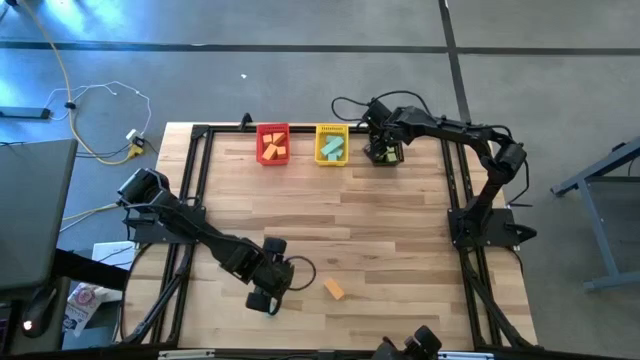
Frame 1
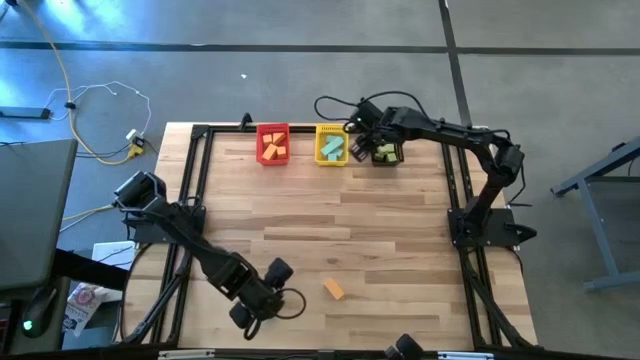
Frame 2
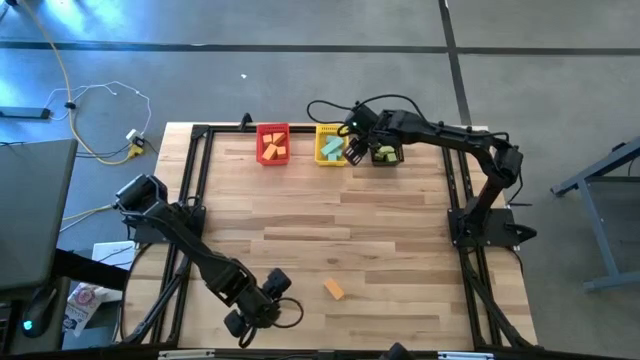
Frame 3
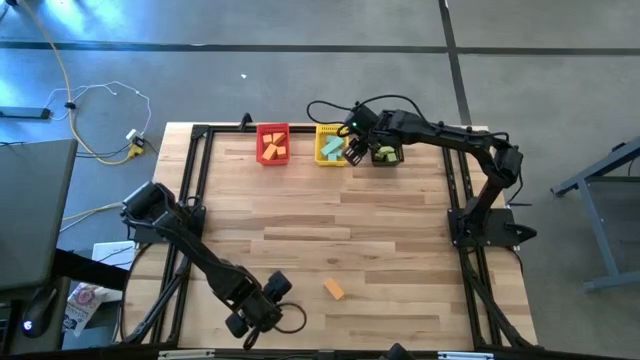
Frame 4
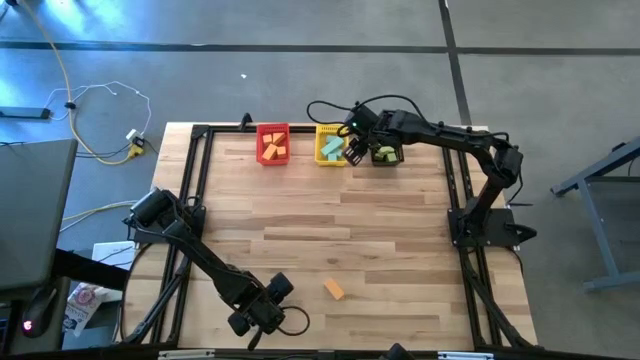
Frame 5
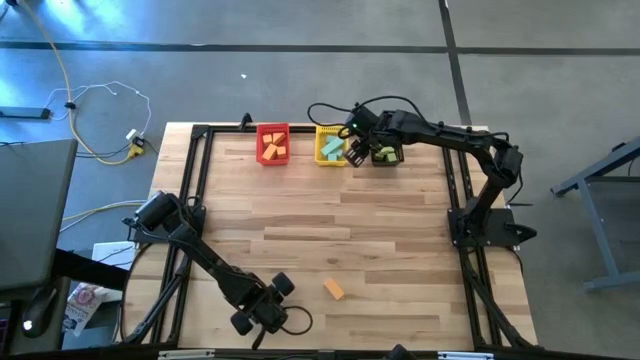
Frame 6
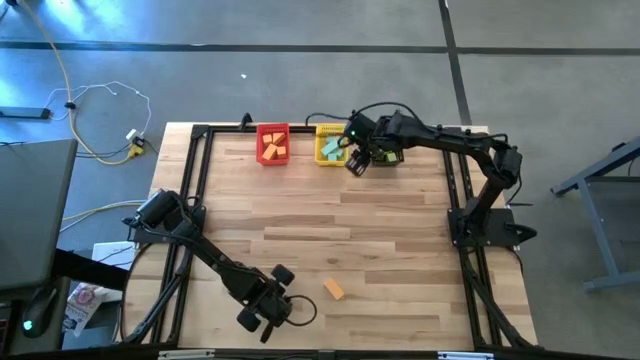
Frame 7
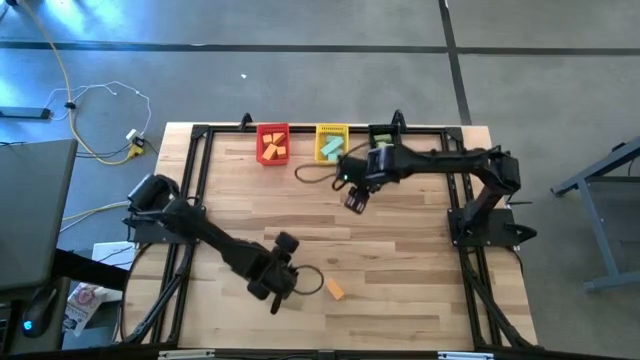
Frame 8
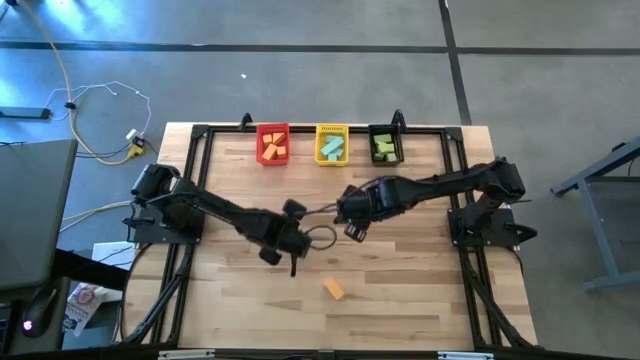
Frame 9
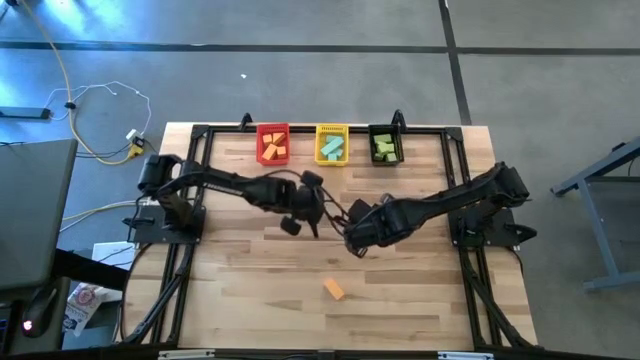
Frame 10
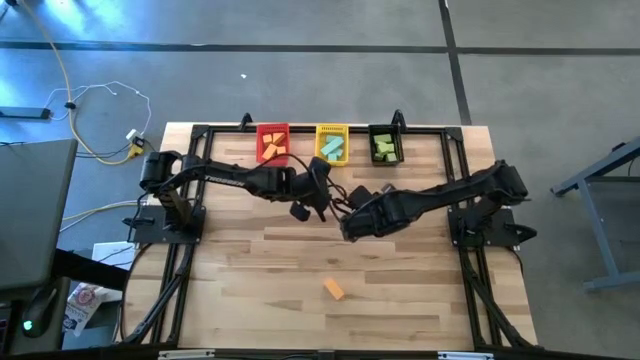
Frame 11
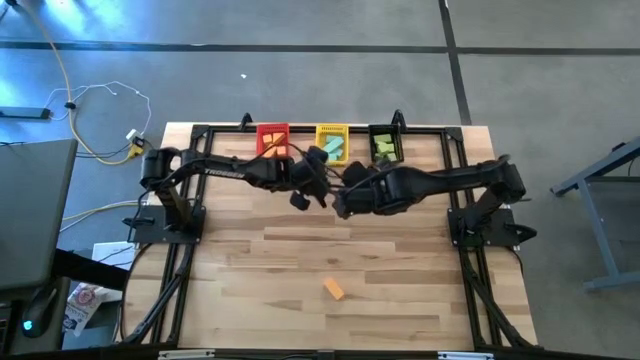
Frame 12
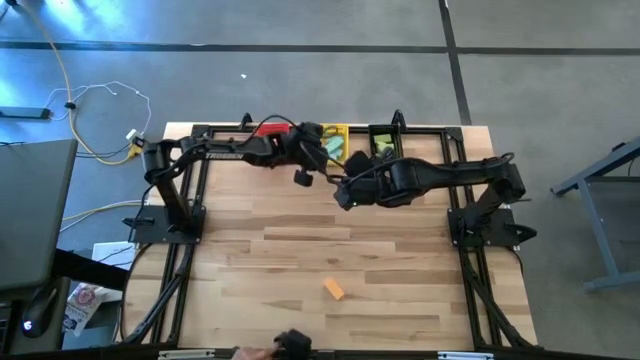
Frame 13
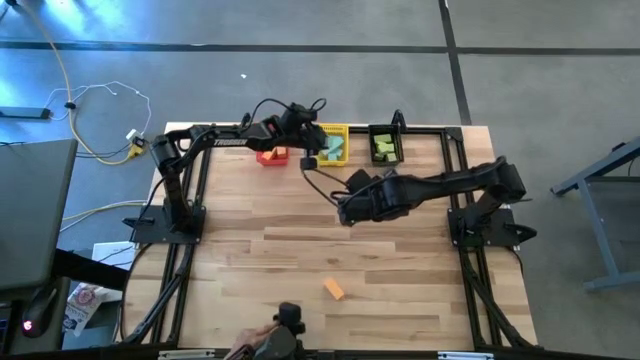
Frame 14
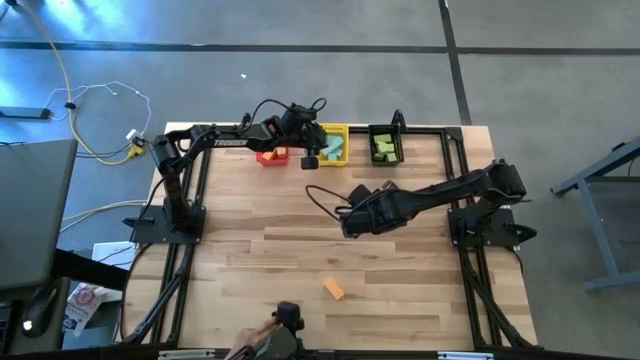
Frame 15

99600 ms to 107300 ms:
Task: Sort & place blocks by color
Put the blue block into the yellow bin

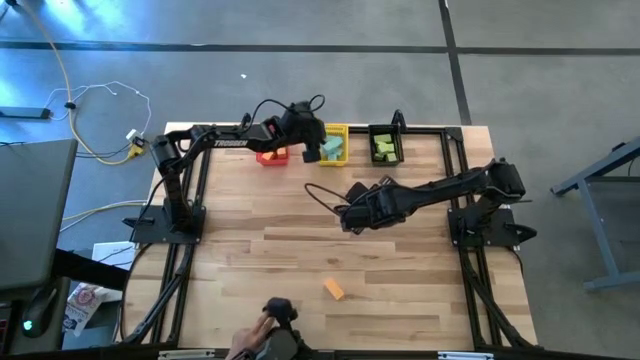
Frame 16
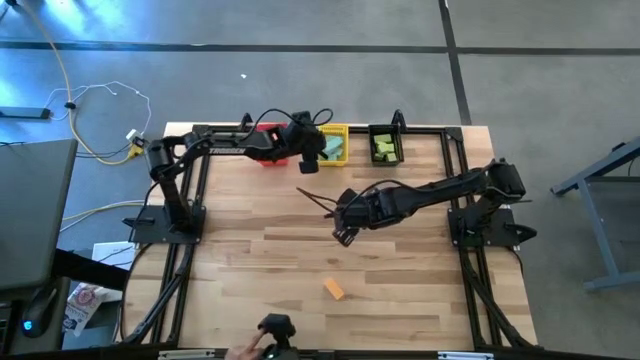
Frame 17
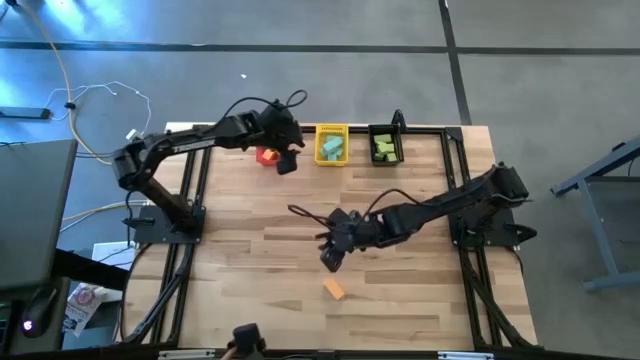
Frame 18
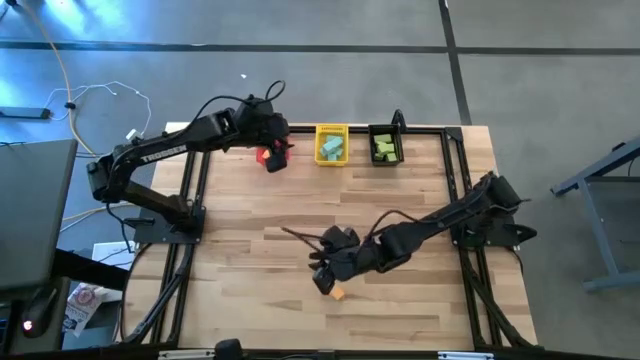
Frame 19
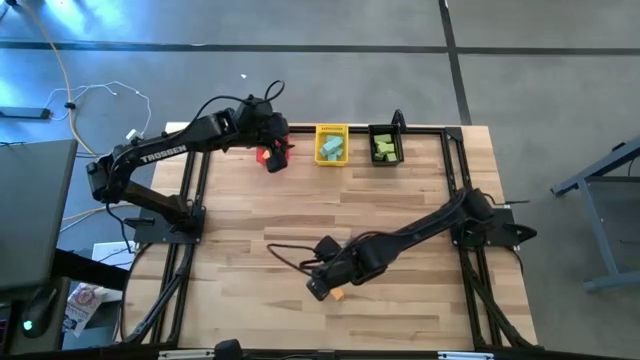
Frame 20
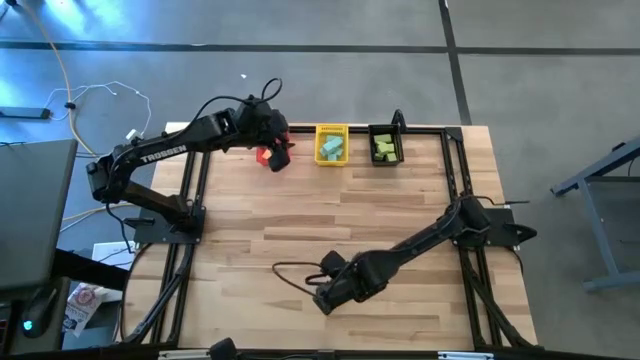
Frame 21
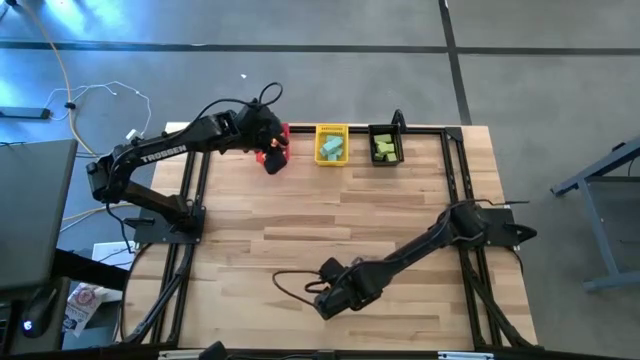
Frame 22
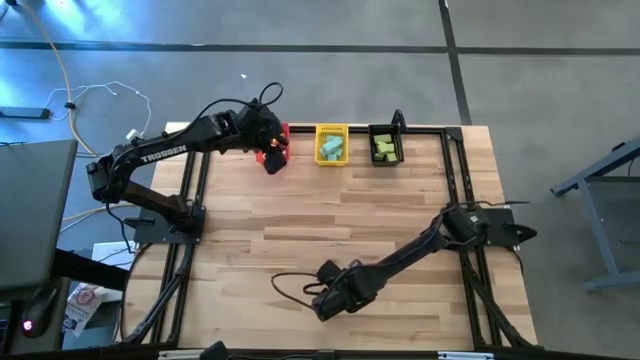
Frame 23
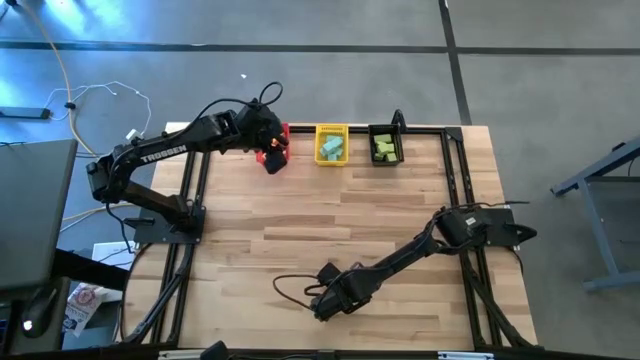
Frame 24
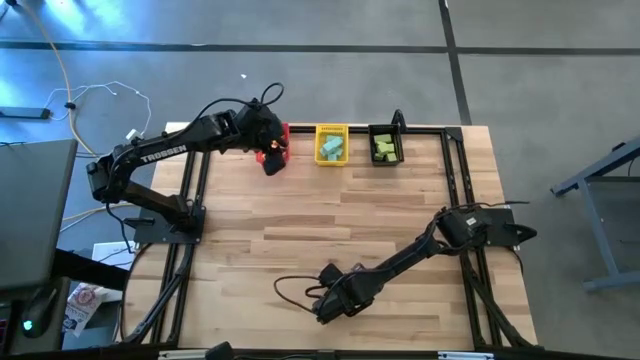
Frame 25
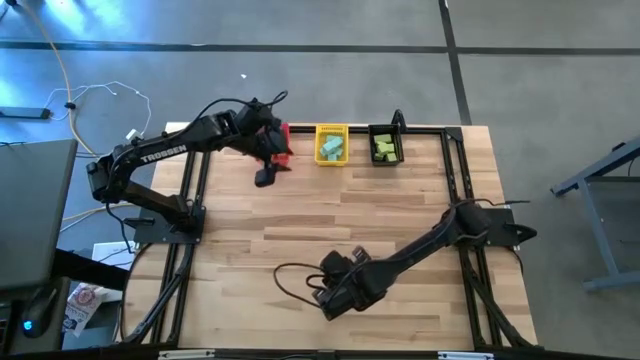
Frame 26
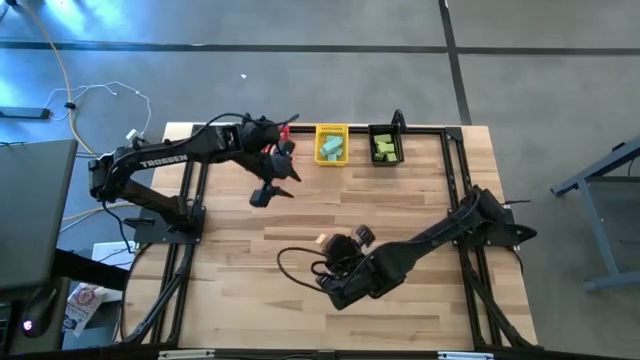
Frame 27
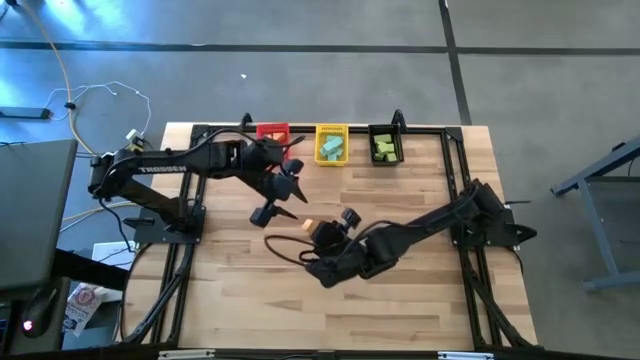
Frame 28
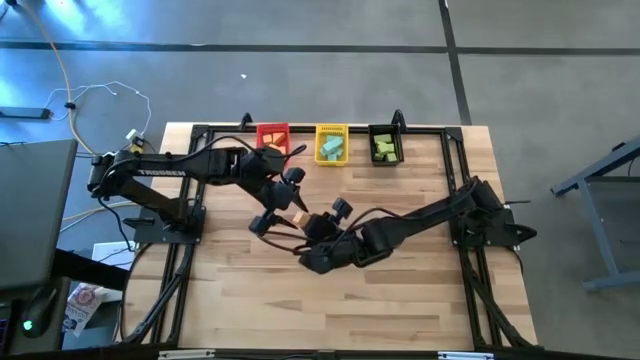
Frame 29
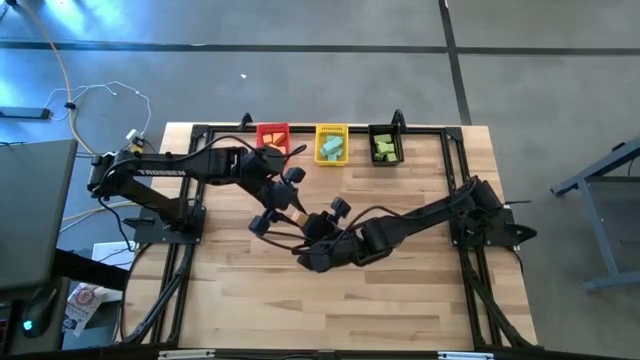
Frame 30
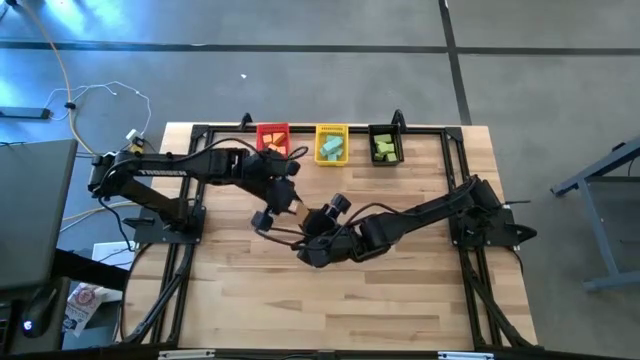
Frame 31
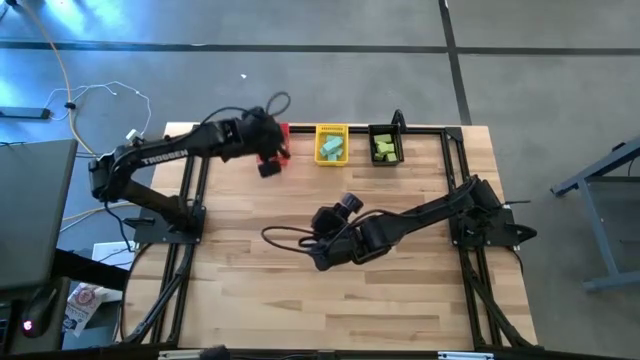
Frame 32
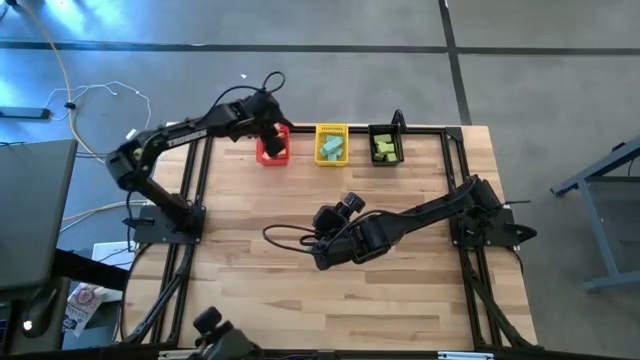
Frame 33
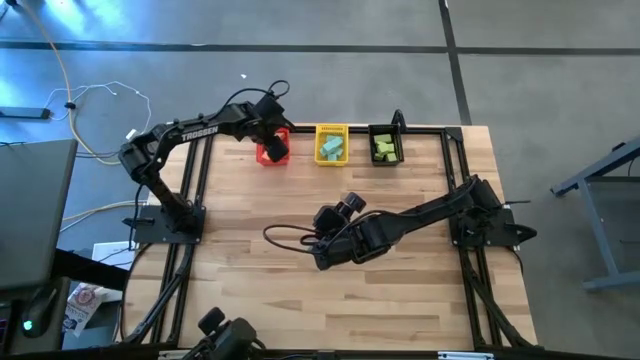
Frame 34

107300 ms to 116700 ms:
Put the orange block into the red bin

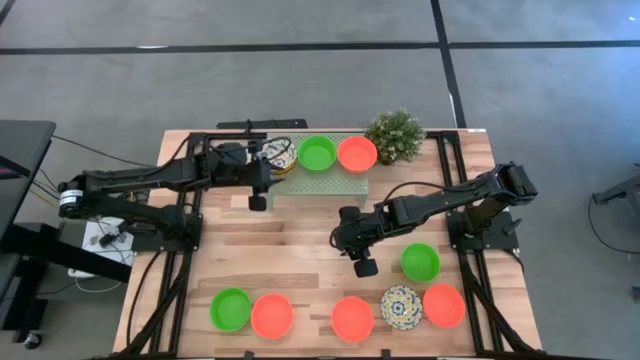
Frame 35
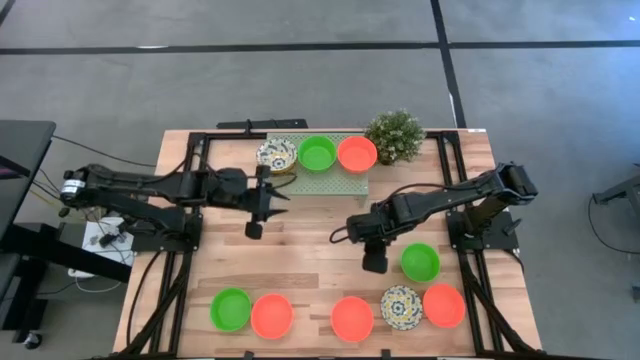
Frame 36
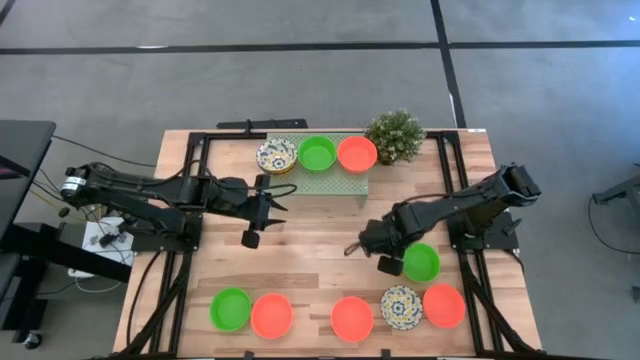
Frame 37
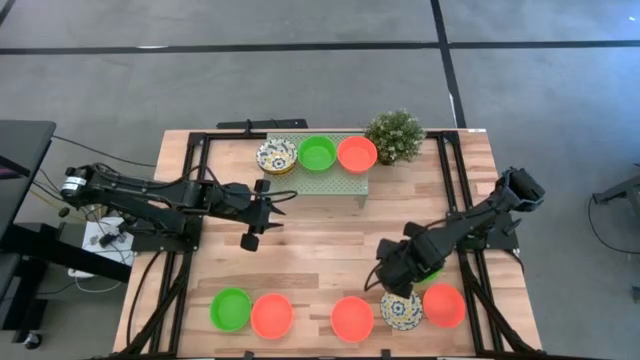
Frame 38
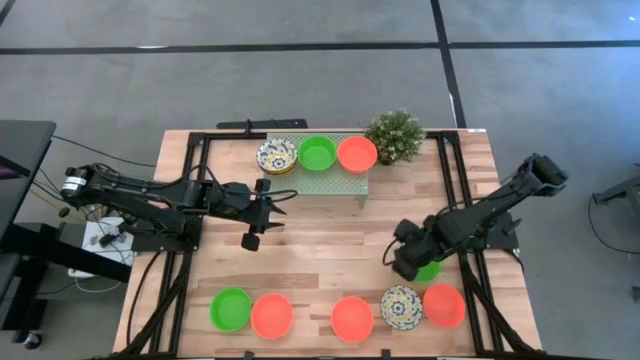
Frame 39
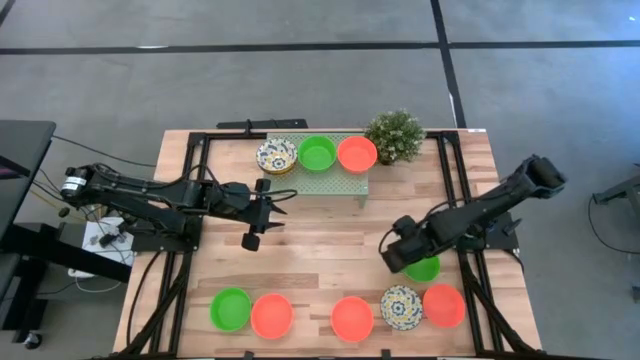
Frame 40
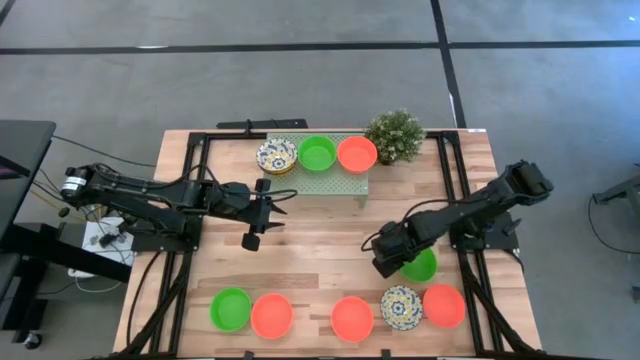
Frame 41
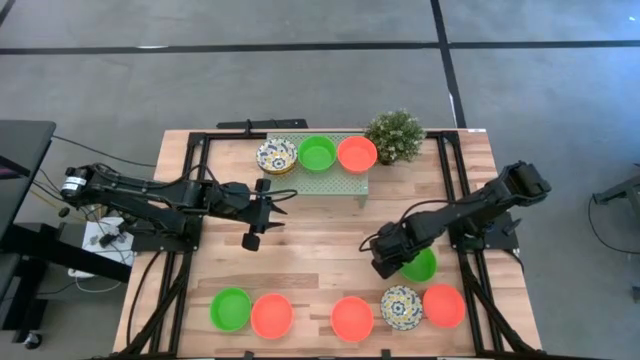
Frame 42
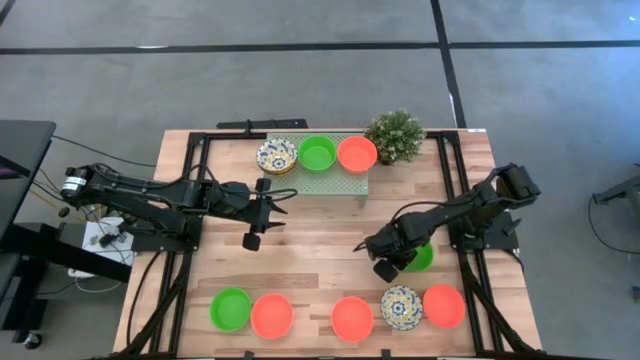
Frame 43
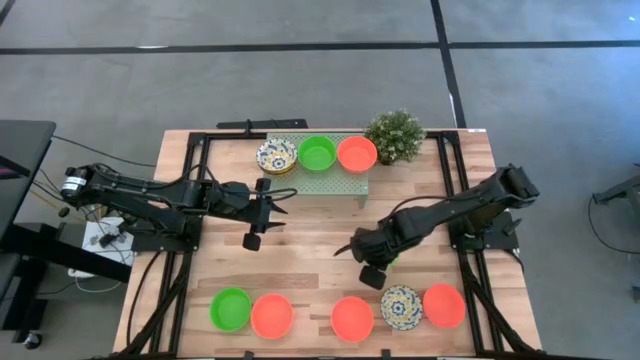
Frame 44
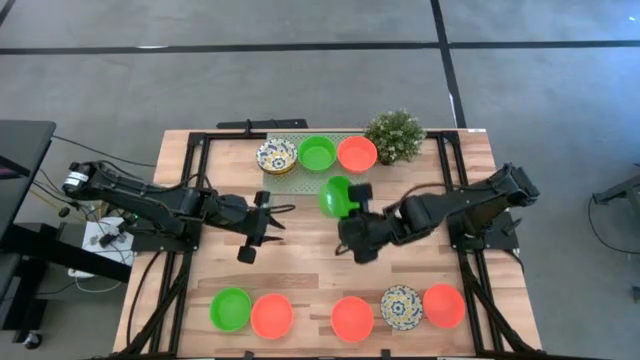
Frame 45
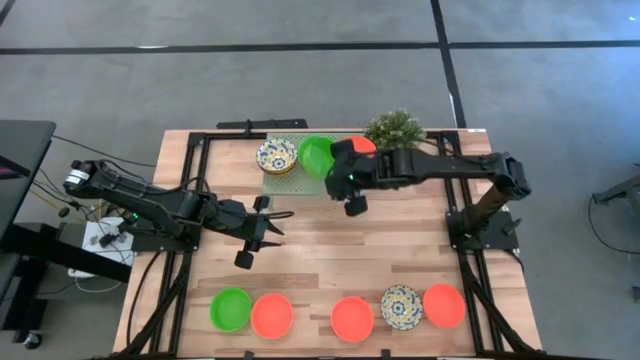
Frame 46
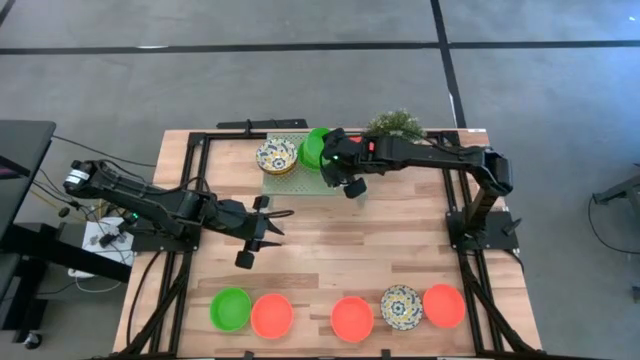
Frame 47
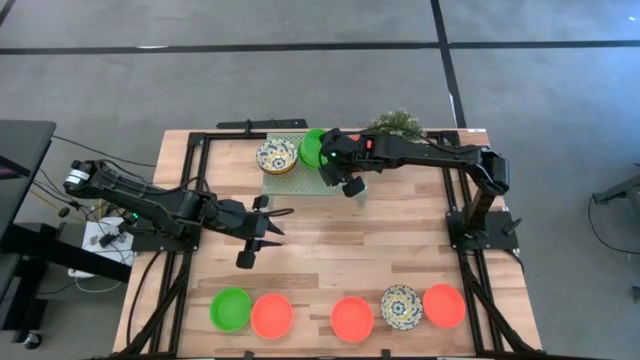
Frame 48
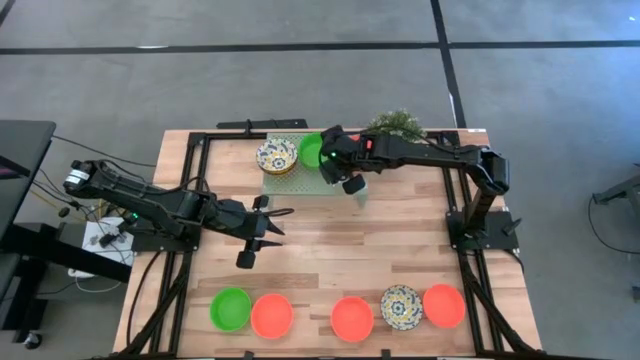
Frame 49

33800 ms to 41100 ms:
Task: Pick & Place Mini bowls
Stack the green bowl on the green bowl on the shelf
